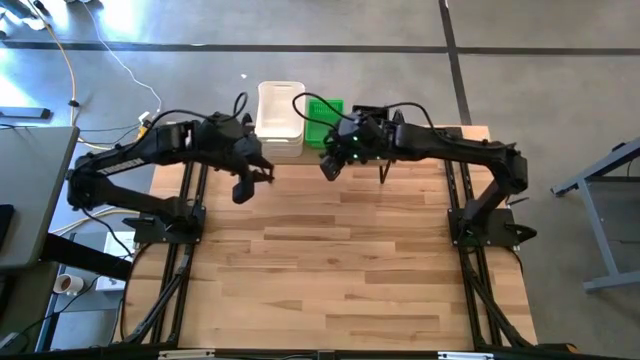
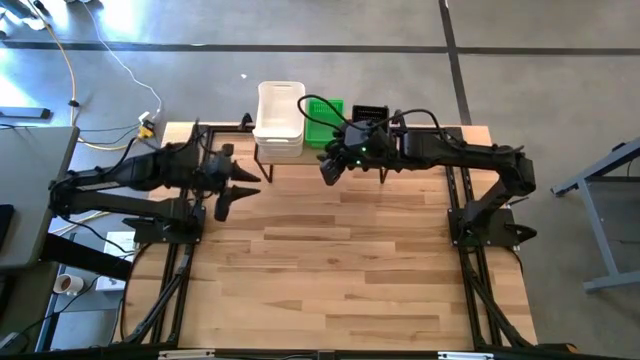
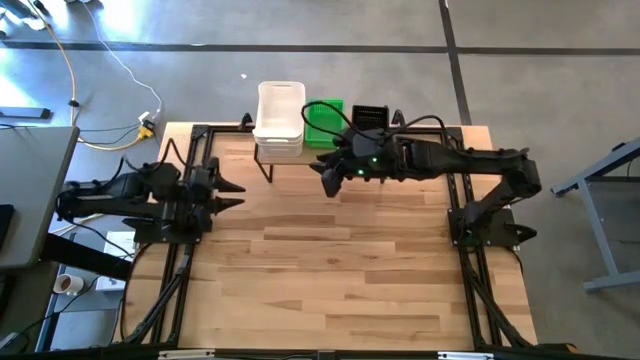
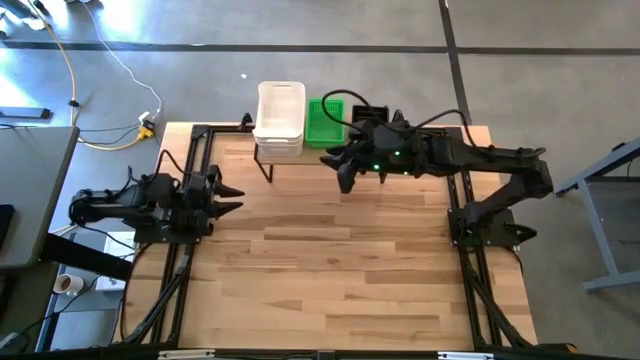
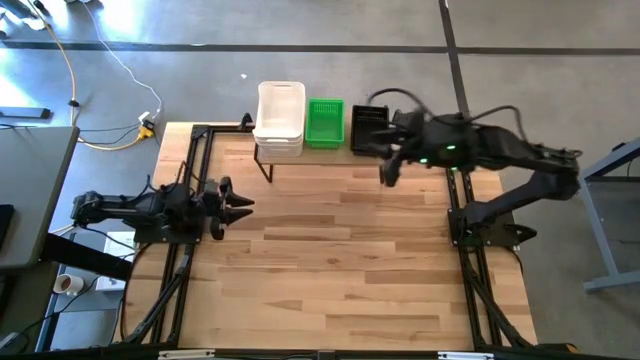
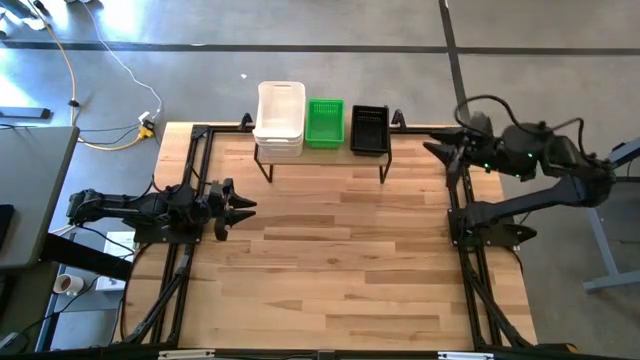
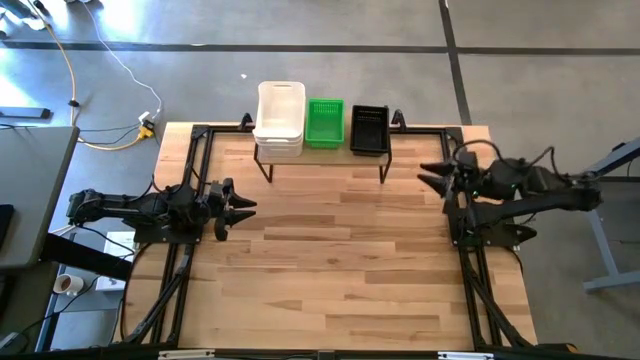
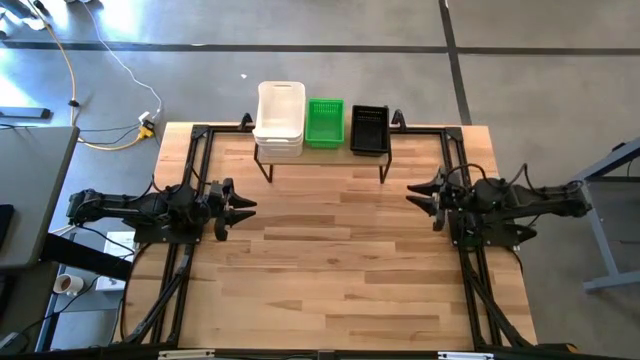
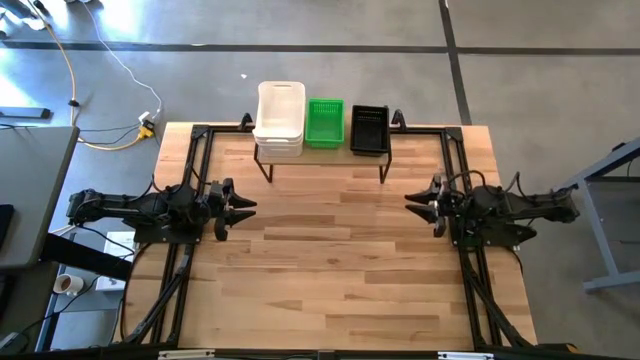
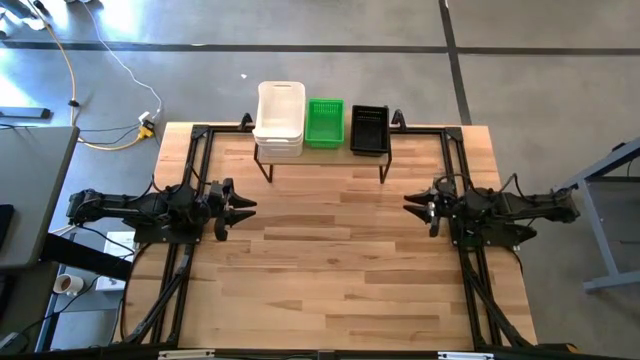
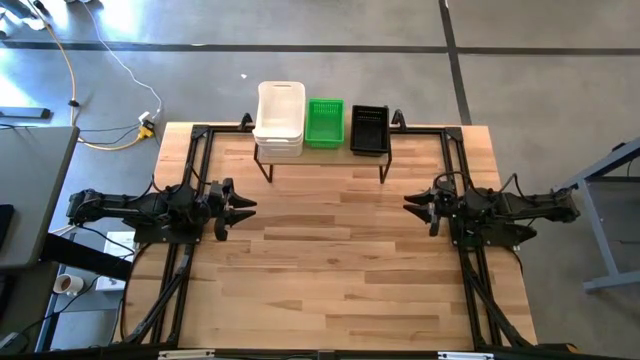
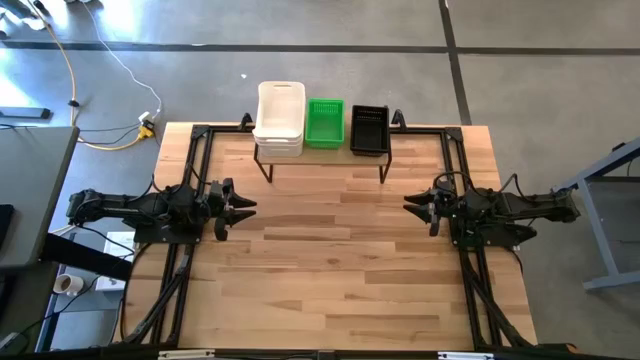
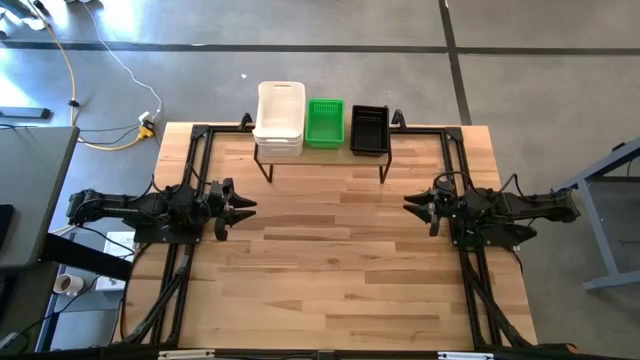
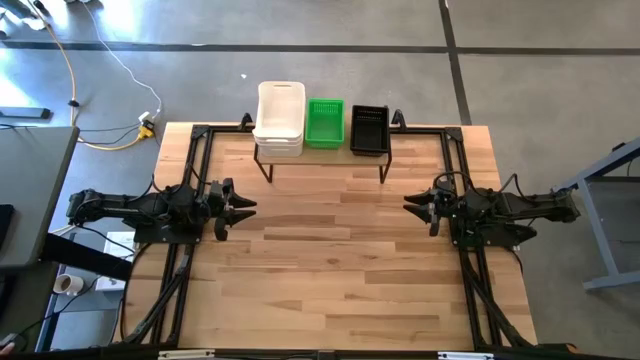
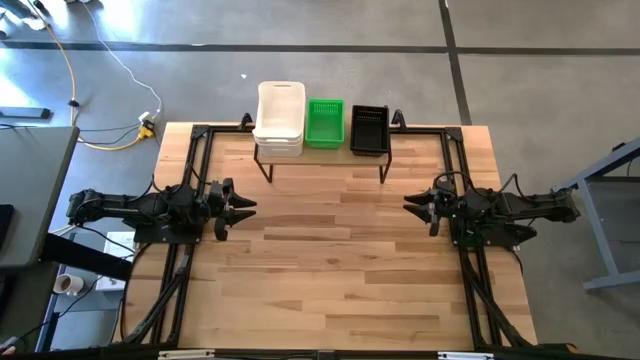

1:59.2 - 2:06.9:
Task: Stack baskets on shelf by color
Return to Home Position

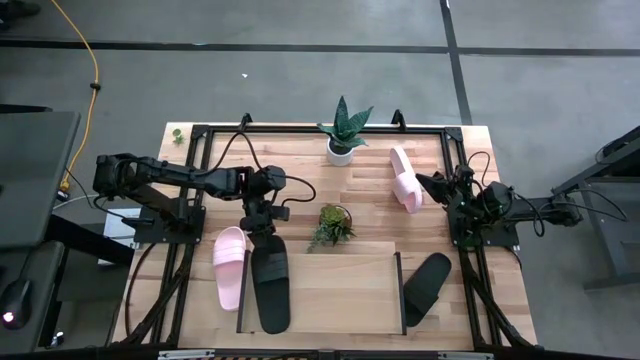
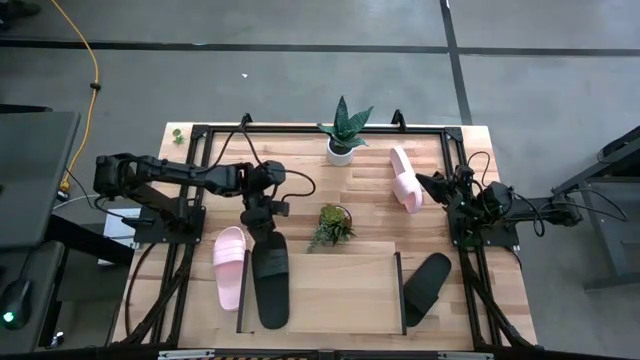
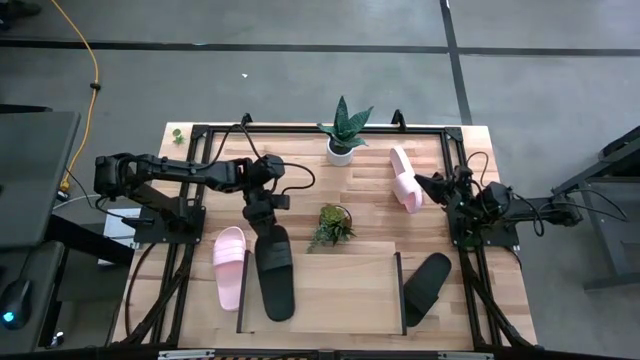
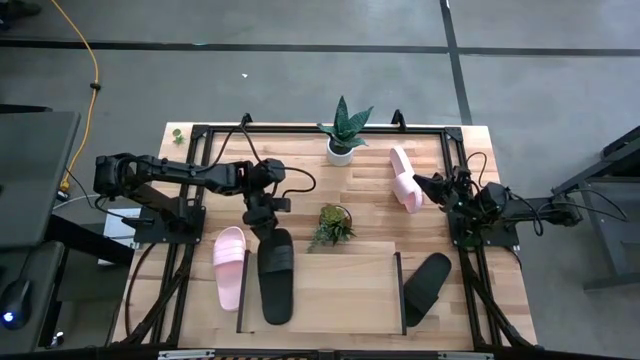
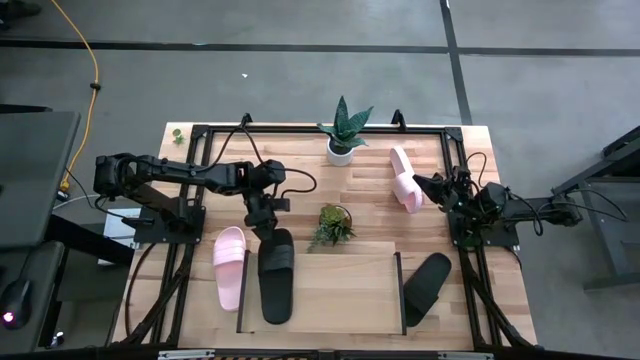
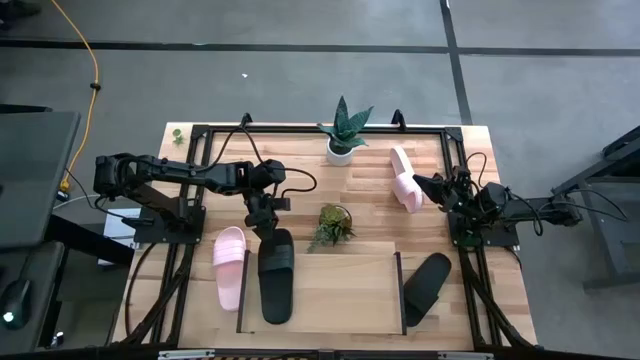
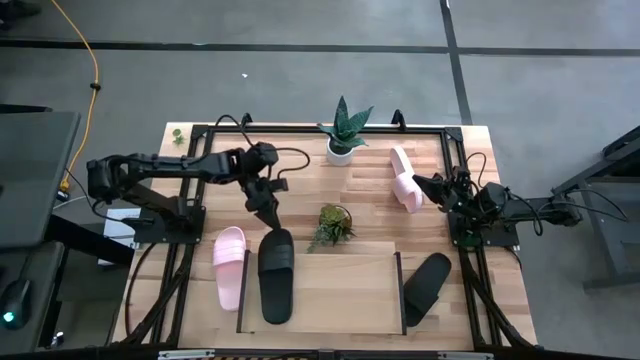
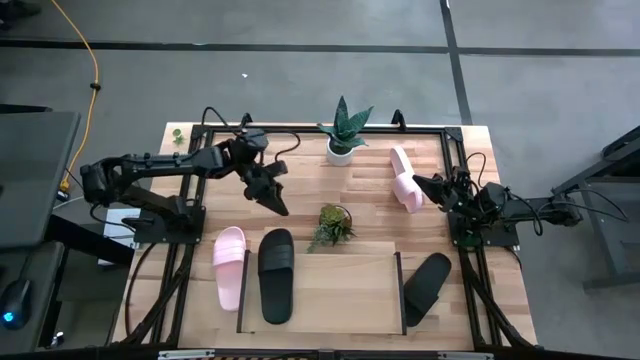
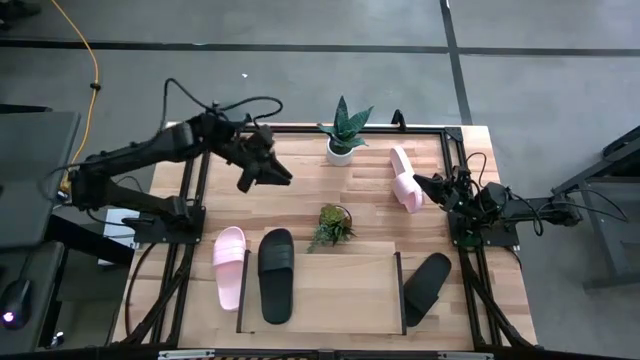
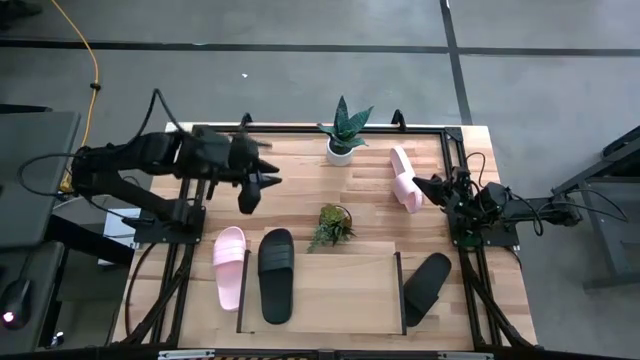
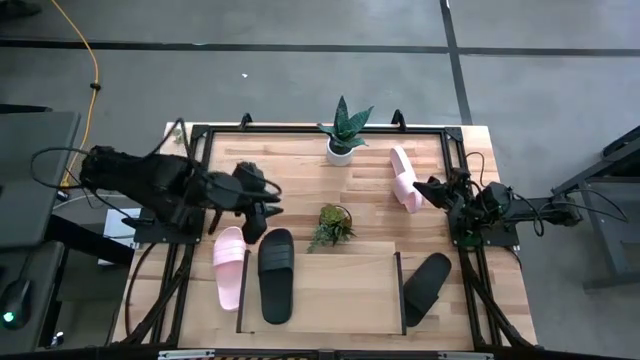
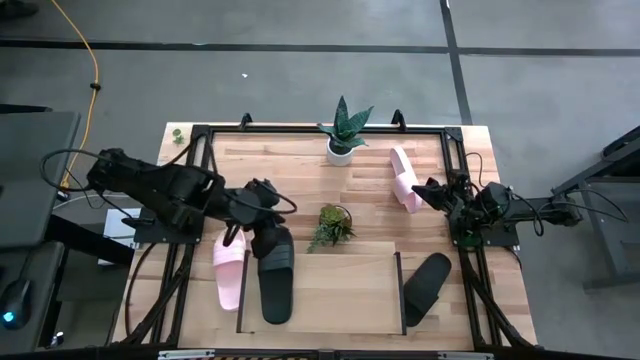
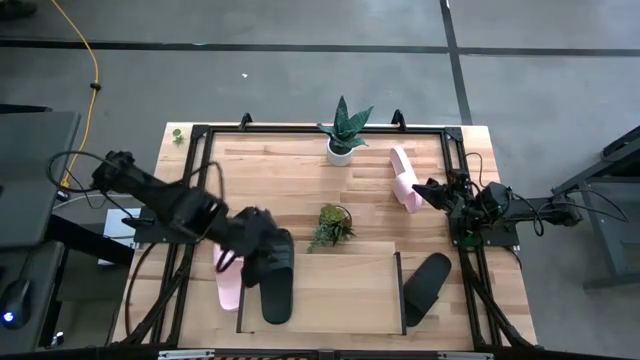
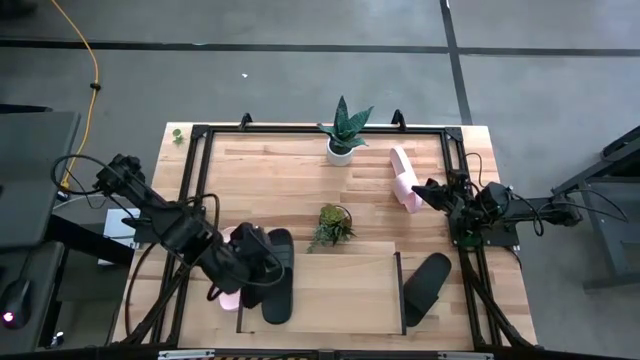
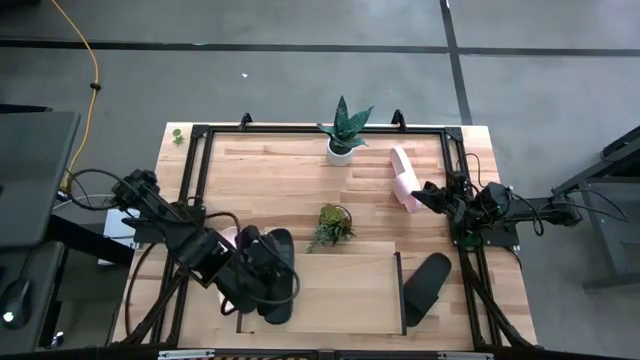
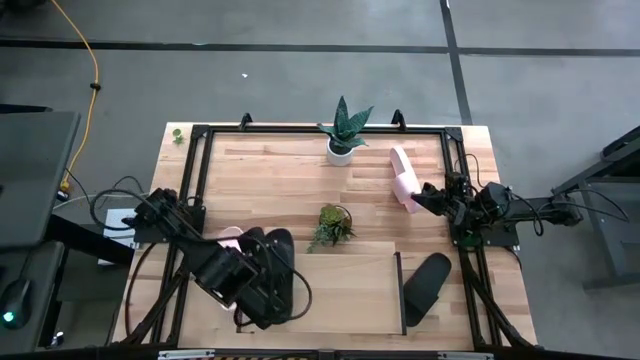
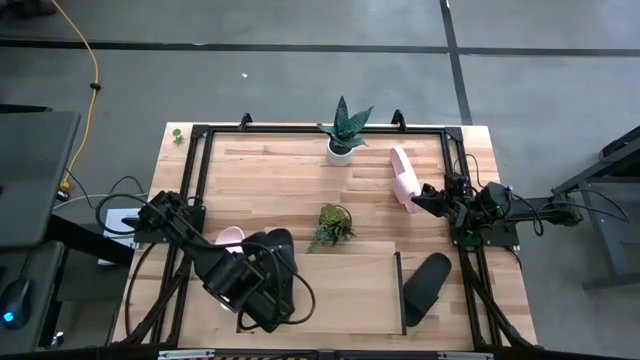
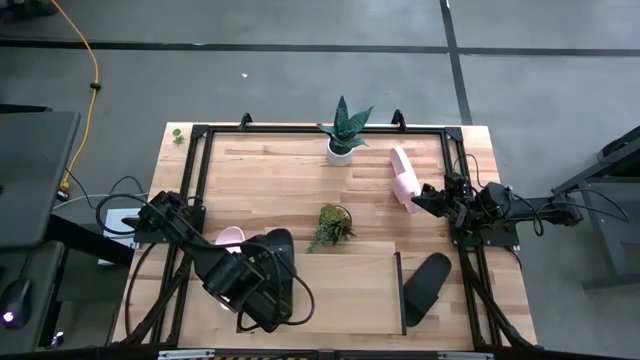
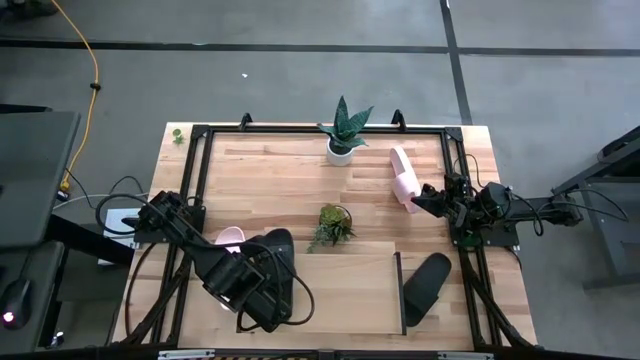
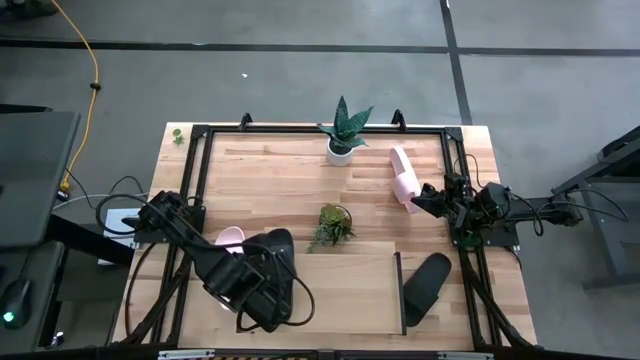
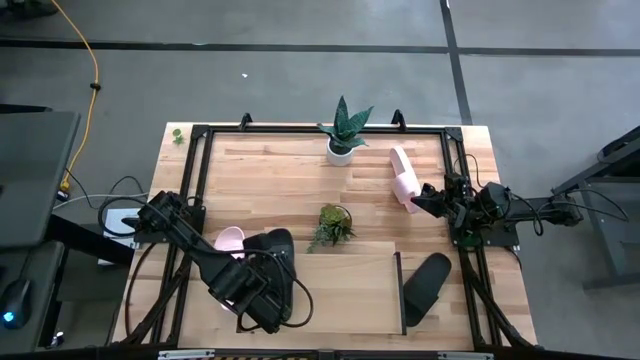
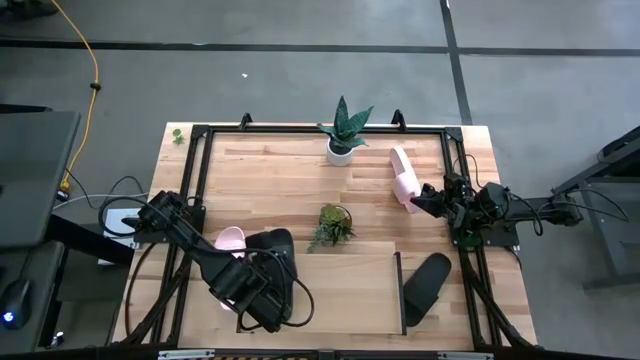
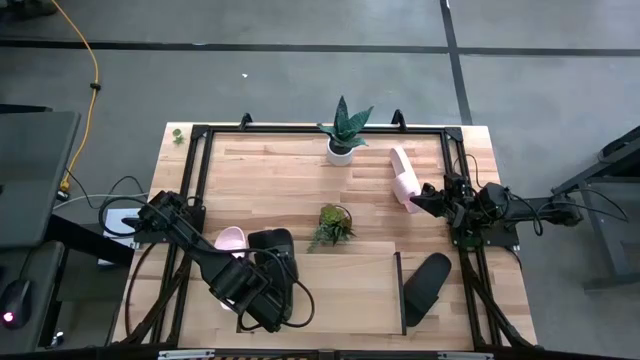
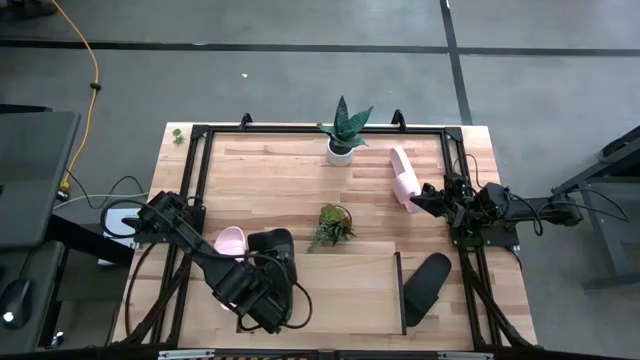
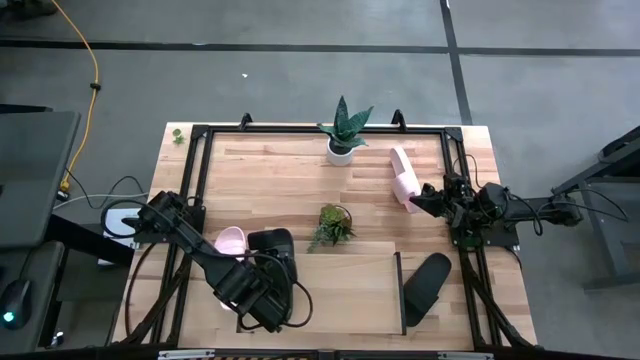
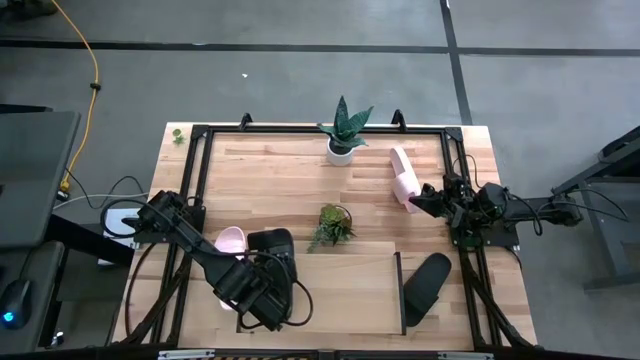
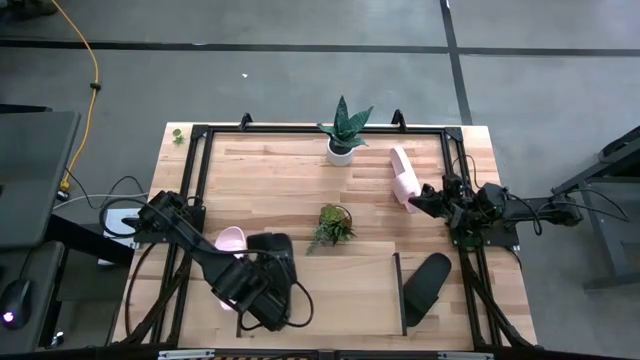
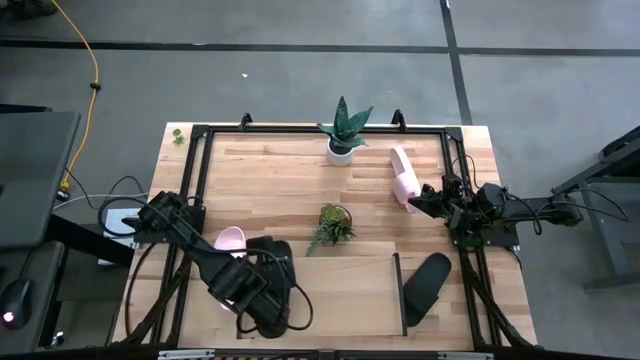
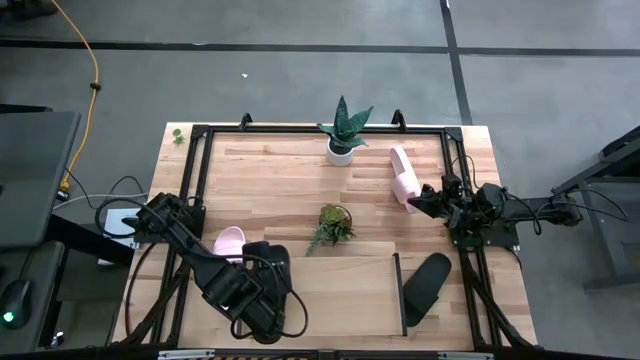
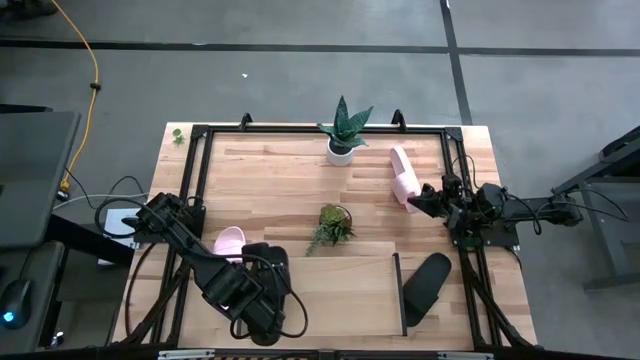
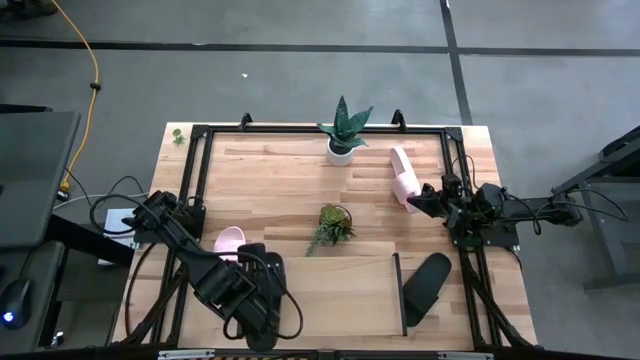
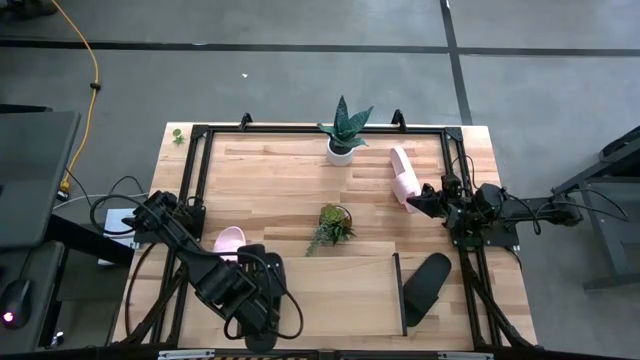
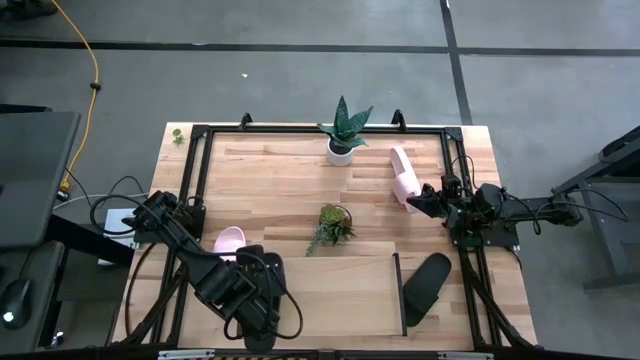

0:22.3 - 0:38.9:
Task: Pick and place slides into the shelf
Put the top black slide on the shelf
